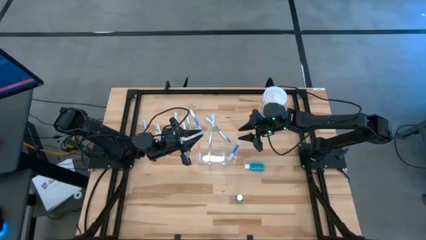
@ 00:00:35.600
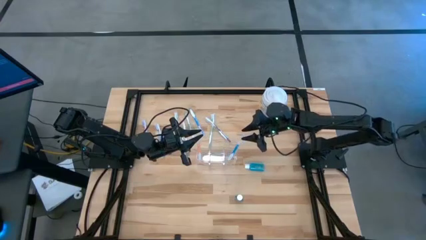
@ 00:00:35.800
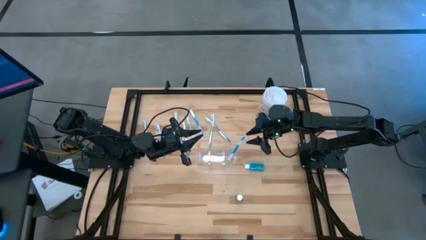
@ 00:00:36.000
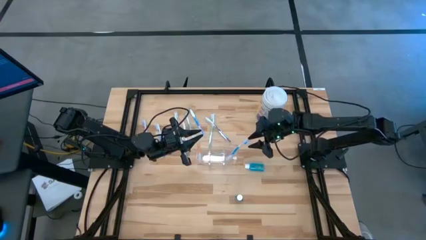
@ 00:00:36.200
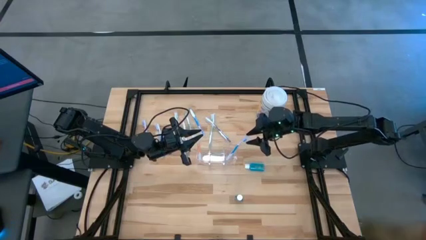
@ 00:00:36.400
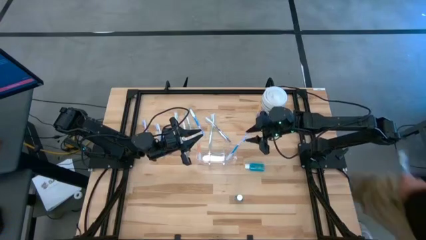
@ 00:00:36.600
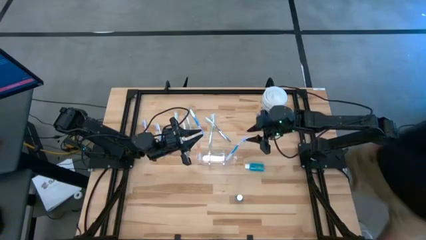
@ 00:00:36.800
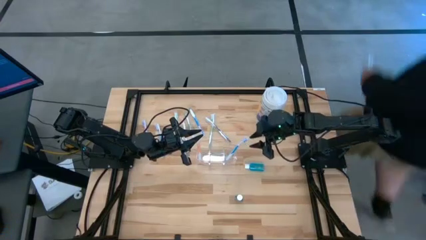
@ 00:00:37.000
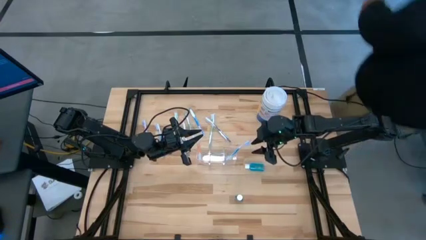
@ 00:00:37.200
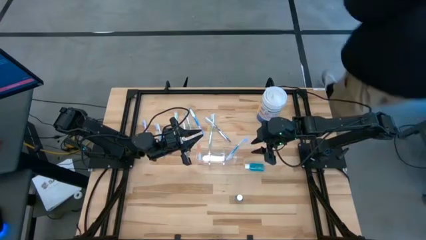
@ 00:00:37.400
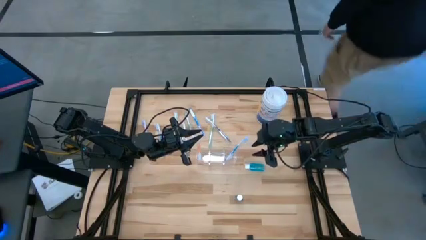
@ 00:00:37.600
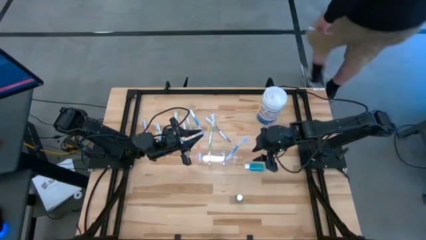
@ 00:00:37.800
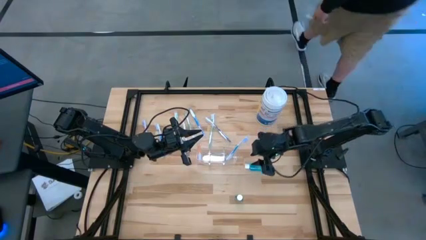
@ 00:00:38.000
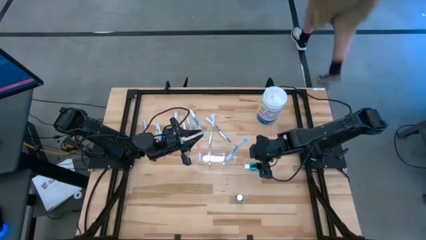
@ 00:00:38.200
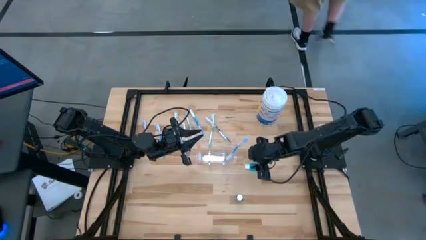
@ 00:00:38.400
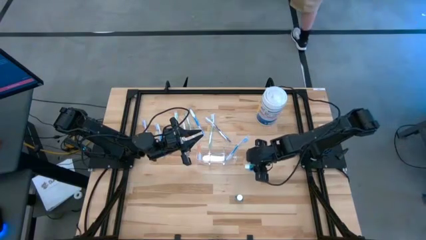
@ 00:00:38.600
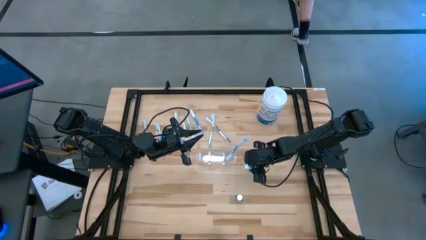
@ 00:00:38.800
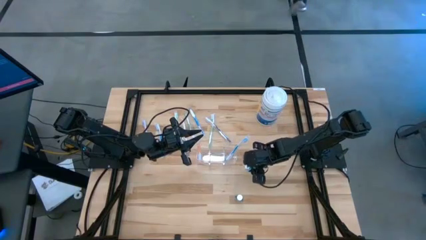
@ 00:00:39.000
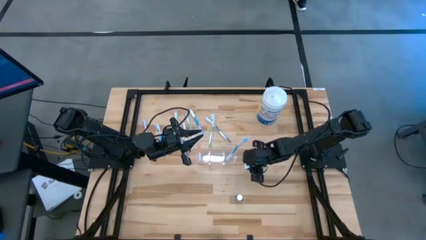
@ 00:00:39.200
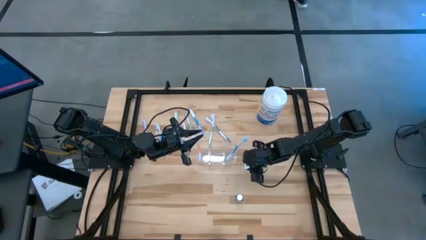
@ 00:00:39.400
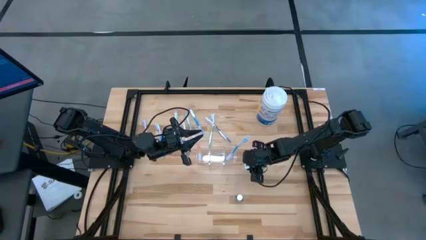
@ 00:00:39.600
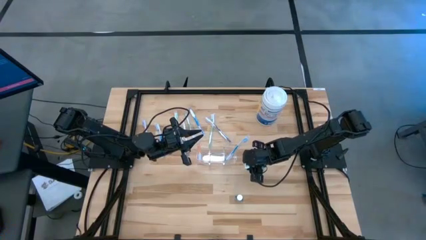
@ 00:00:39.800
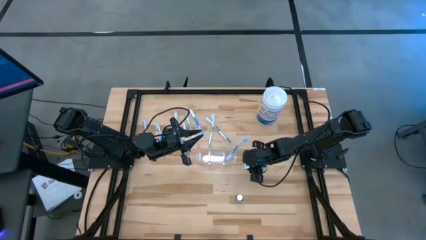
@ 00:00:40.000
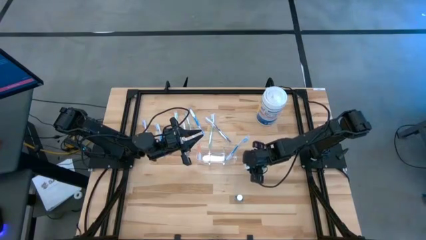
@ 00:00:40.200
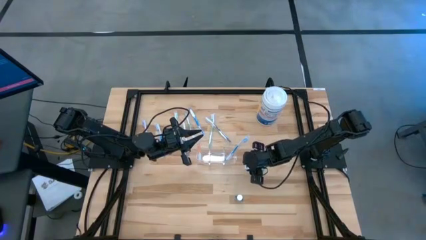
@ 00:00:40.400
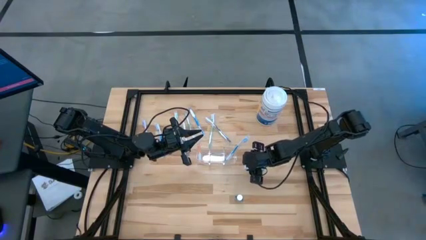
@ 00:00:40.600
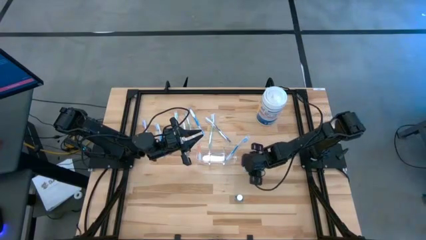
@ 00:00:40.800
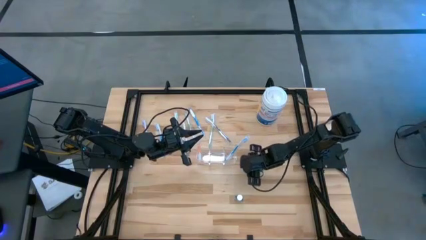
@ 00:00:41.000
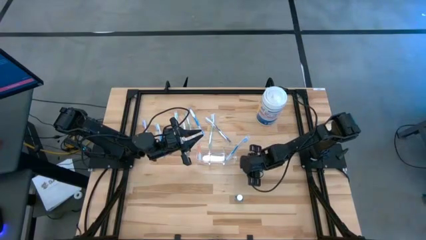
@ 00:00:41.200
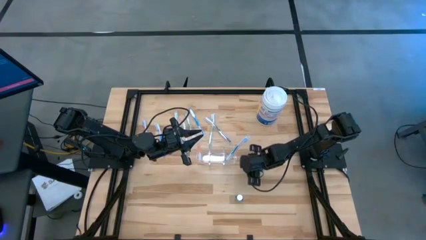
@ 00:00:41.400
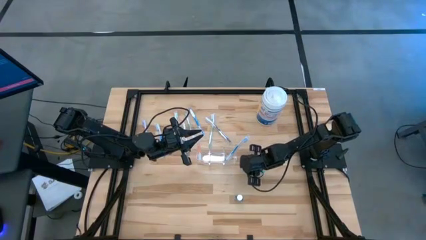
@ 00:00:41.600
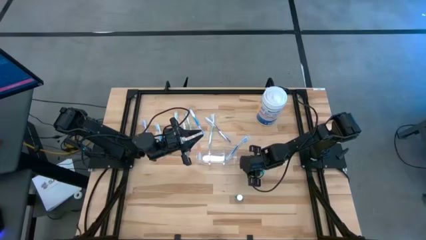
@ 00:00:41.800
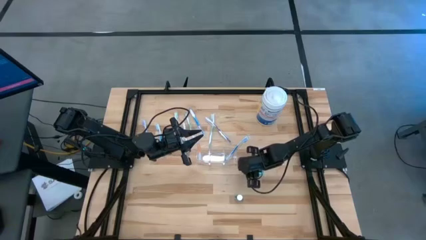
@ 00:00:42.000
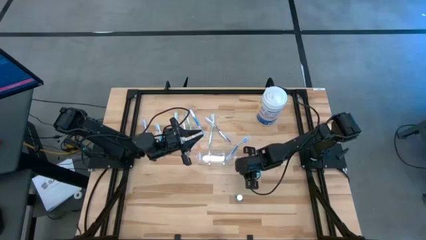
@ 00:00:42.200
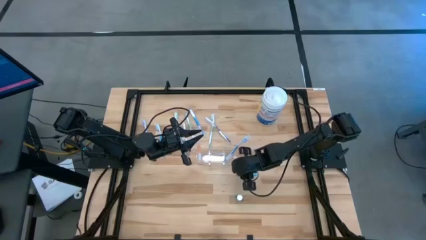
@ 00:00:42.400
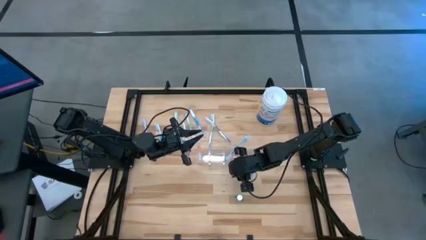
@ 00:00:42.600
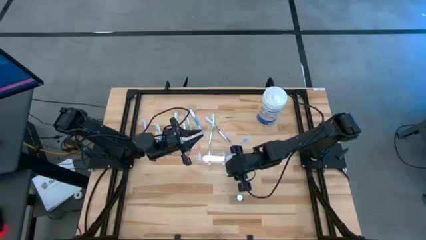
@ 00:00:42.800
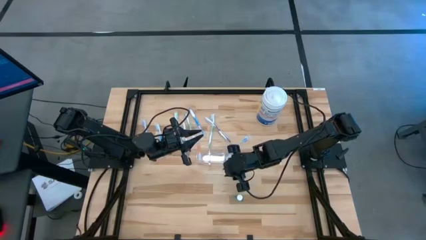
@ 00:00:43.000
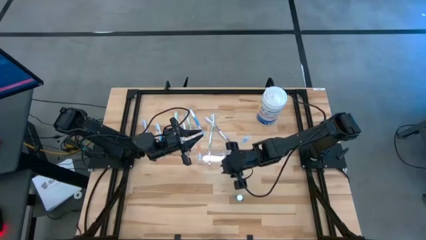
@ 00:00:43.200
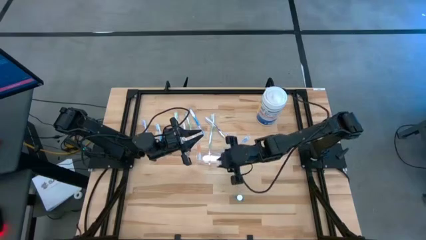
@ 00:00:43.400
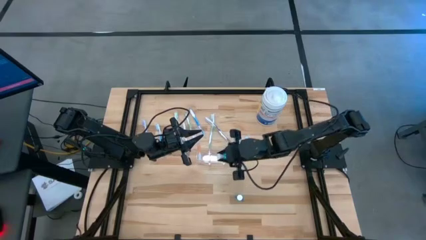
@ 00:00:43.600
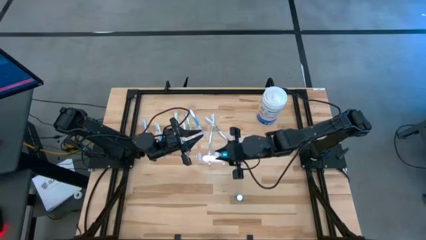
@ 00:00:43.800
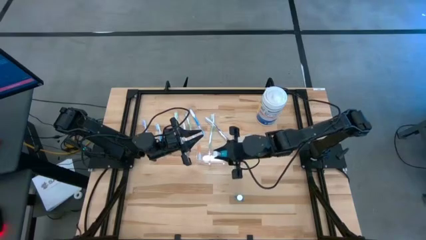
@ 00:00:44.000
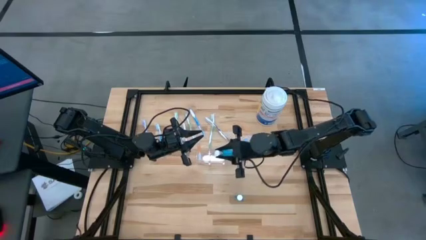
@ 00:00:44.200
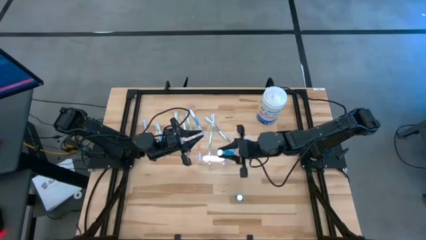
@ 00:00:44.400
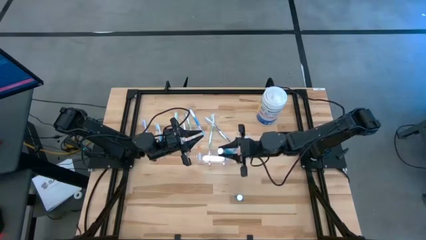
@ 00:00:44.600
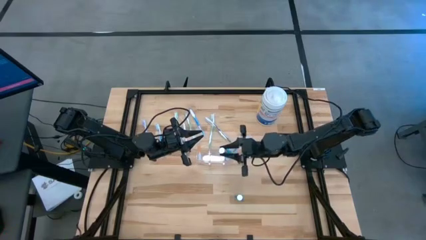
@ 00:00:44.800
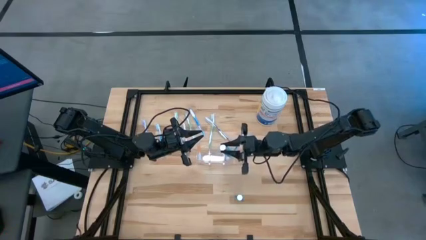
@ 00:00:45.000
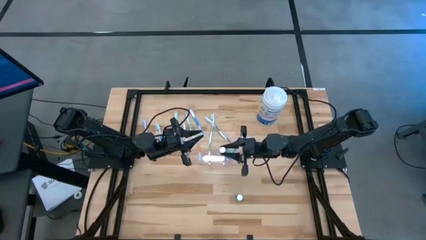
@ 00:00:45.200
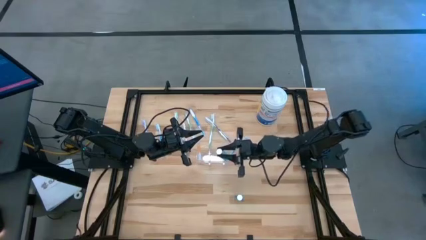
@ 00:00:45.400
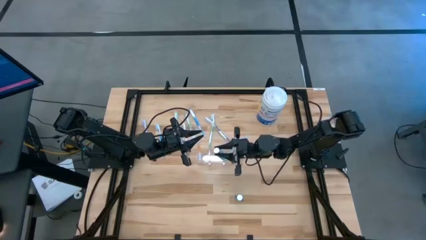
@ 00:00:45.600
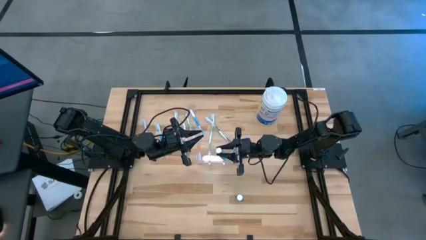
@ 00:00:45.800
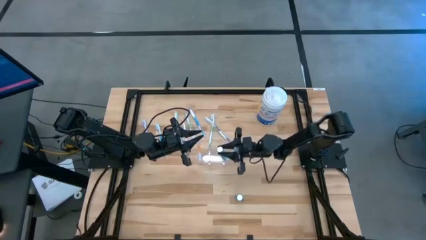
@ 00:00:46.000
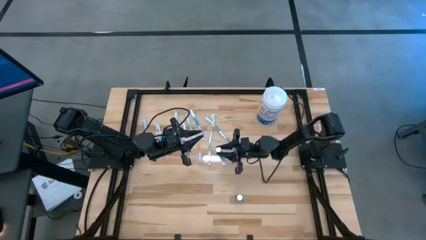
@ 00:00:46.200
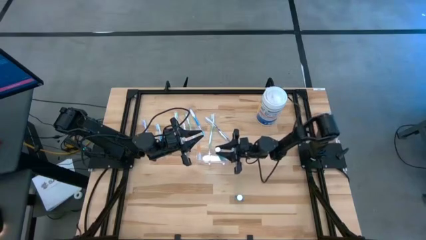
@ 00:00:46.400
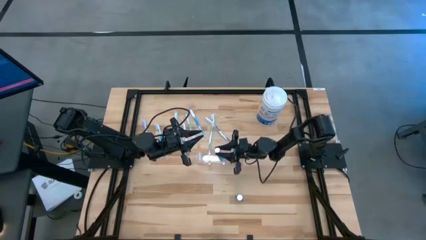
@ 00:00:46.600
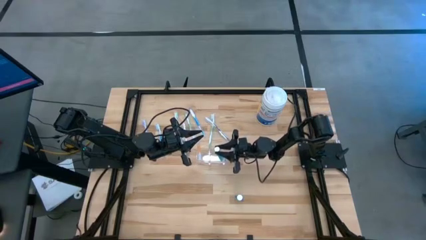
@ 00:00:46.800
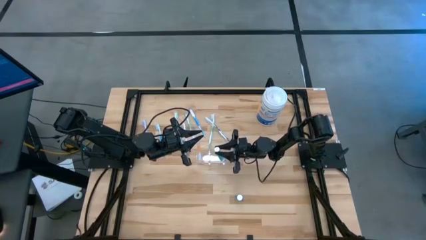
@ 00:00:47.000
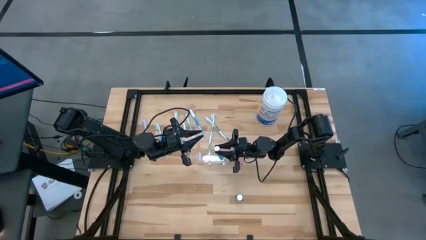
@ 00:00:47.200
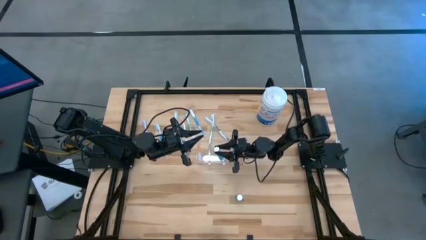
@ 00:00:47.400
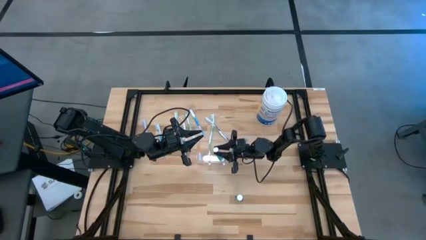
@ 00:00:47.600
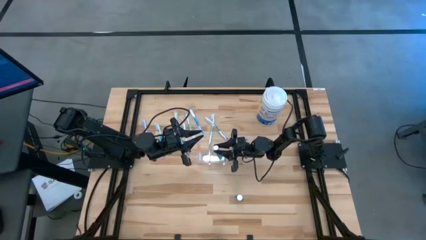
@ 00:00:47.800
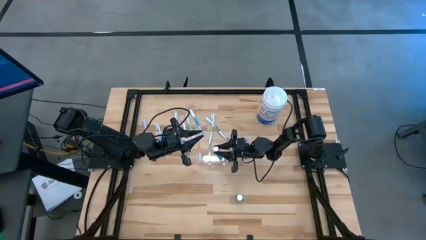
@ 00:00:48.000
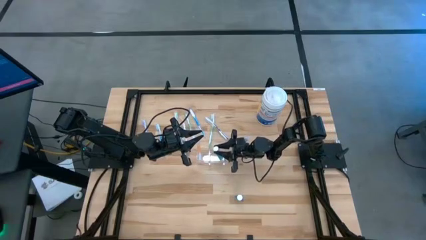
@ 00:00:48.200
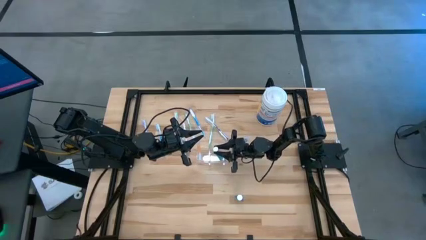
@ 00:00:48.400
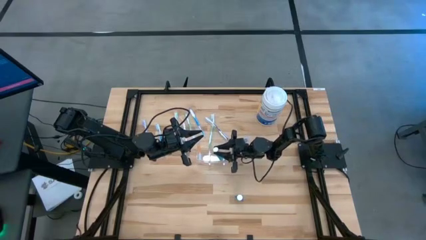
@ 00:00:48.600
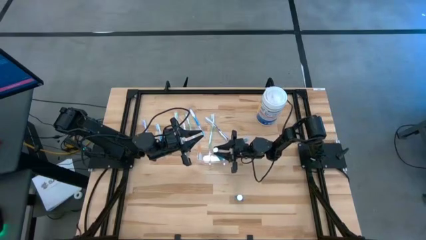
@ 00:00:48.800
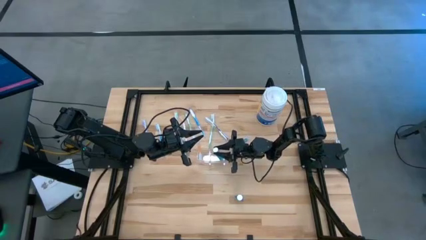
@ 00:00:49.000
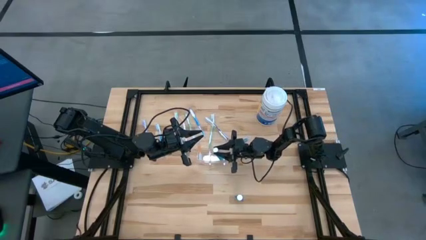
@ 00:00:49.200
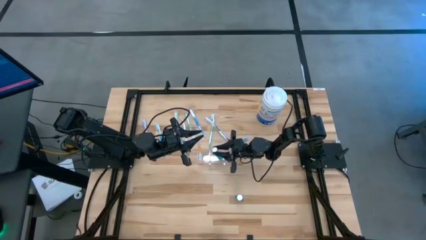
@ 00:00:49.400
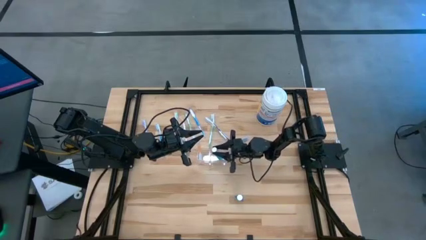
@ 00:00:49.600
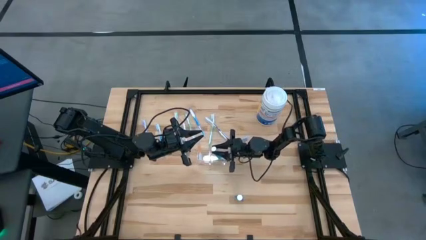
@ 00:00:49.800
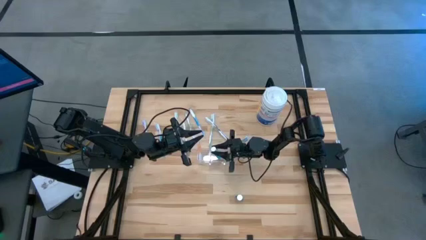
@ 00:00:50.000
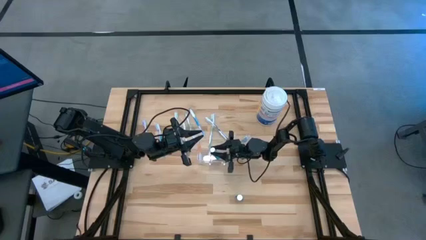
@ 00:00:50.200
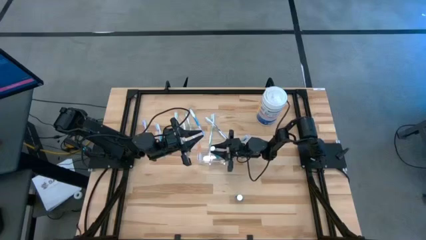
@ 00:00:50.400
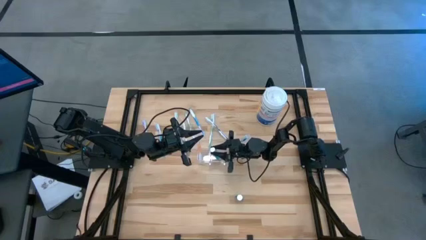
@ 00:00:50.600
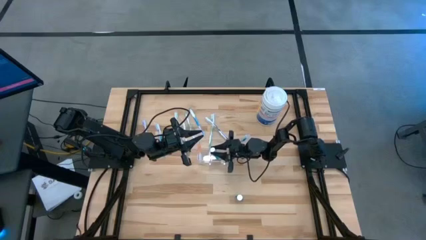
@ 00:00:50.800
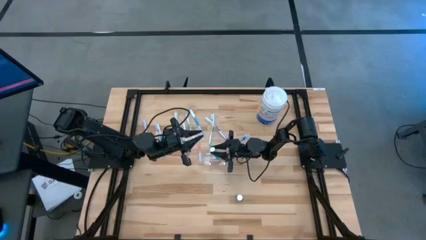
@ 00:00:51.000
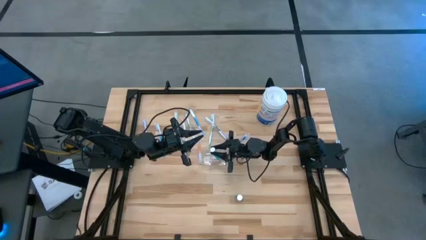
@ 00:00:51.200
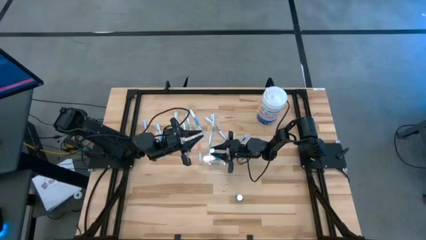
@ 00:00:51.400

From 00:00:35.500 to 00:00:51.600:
Task: Pick & Place toothbrushing station
Put the top mouthwash into the transparent organizer
